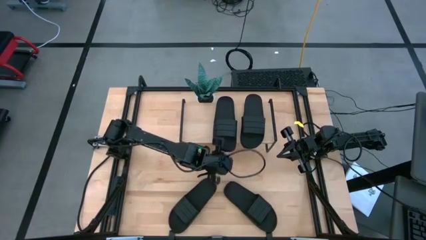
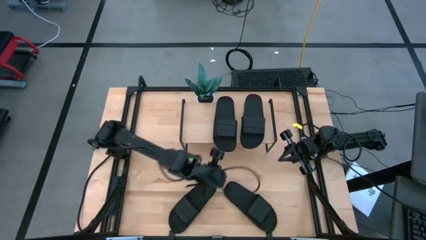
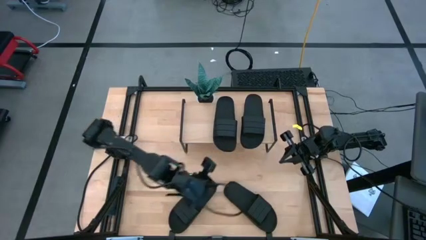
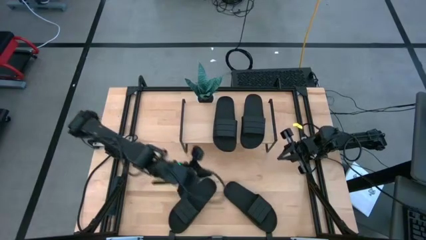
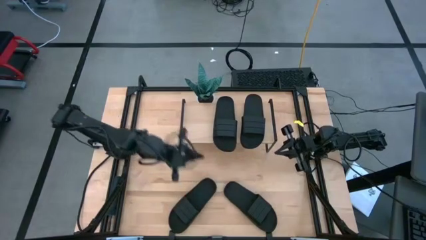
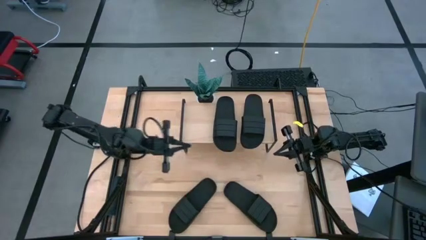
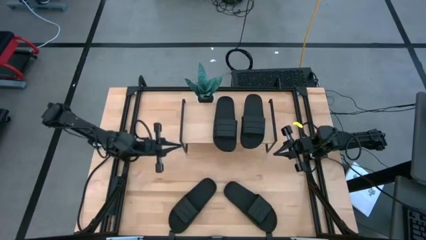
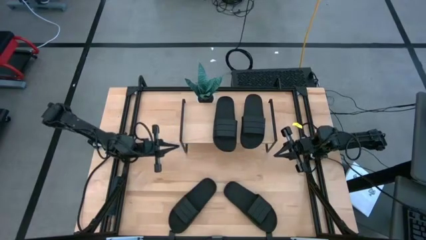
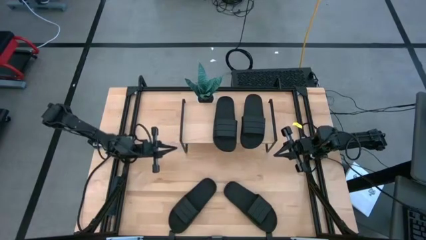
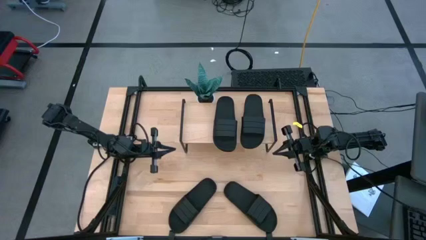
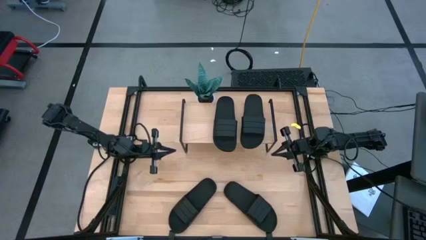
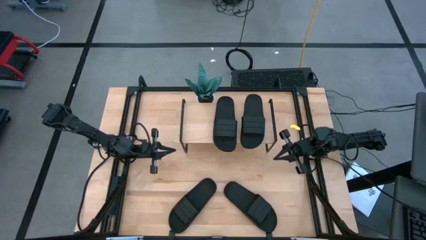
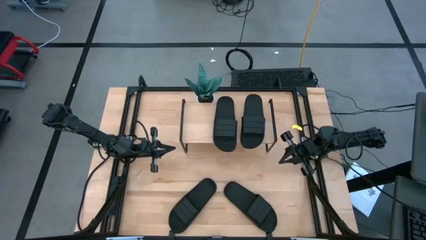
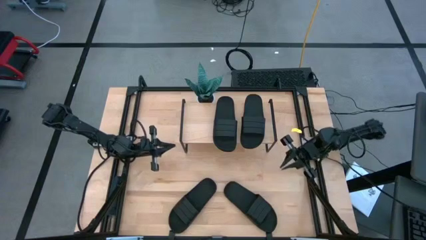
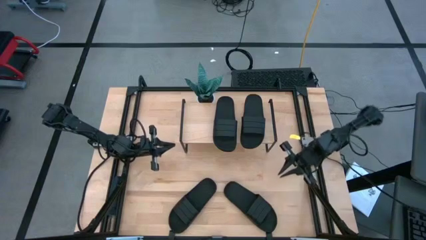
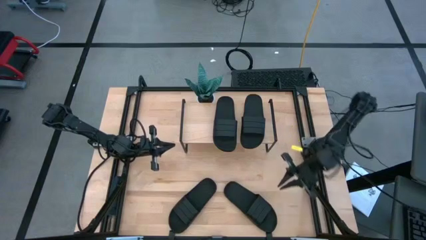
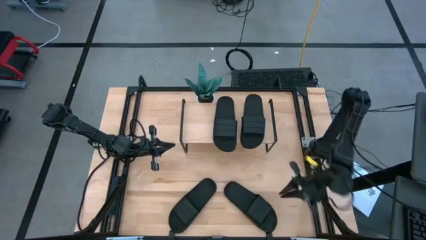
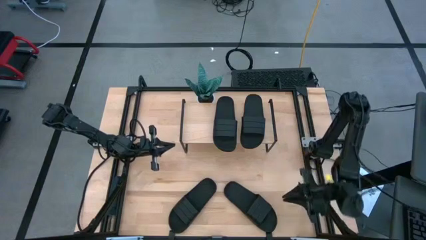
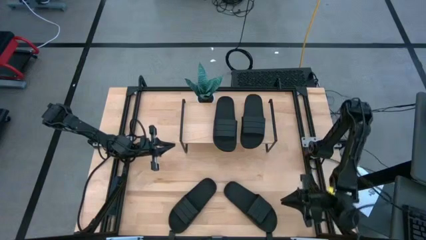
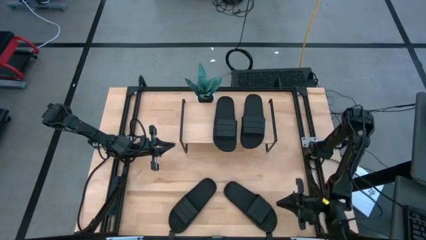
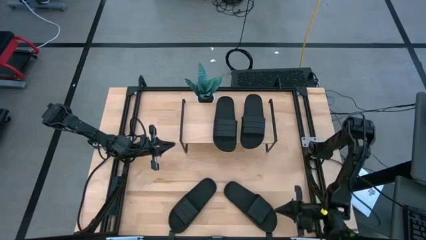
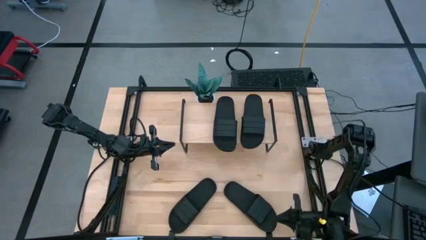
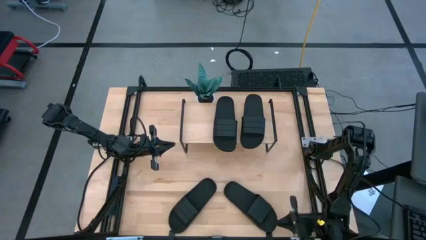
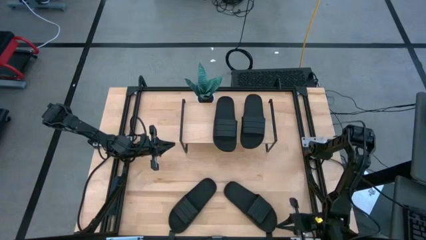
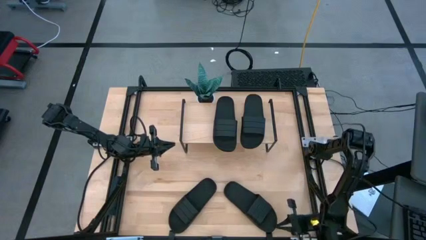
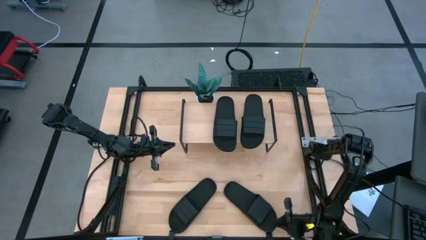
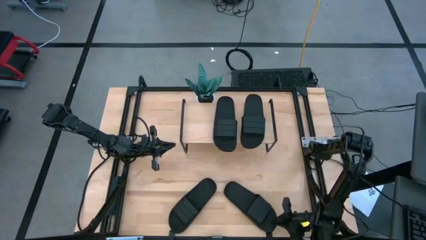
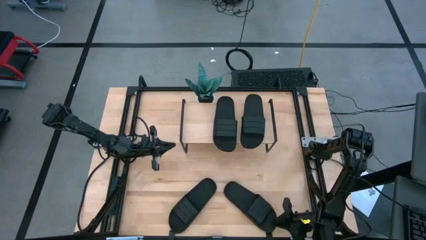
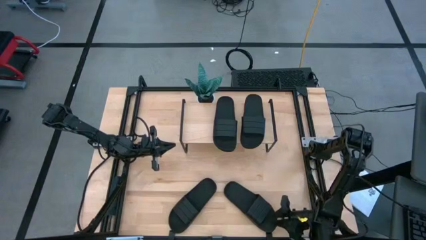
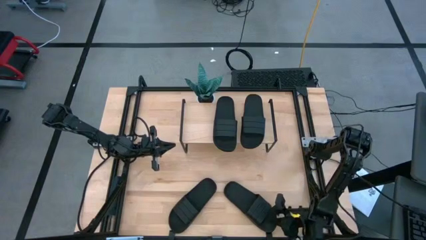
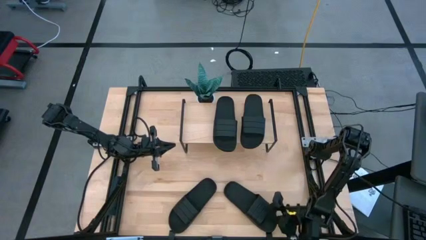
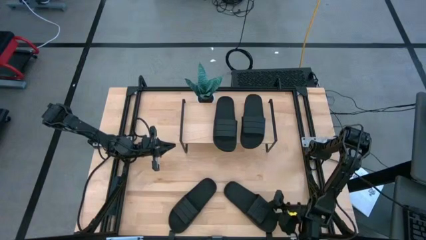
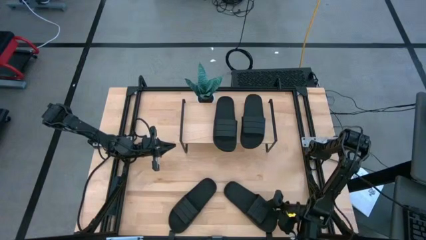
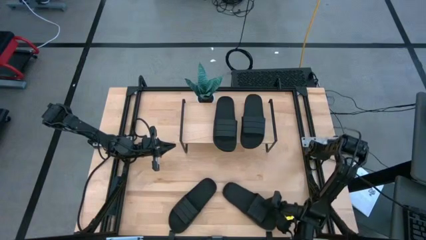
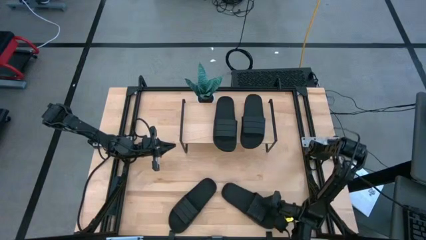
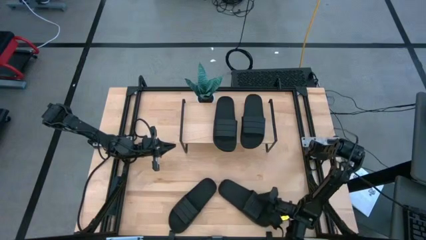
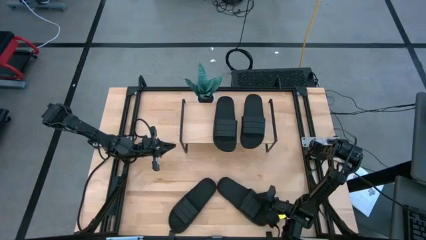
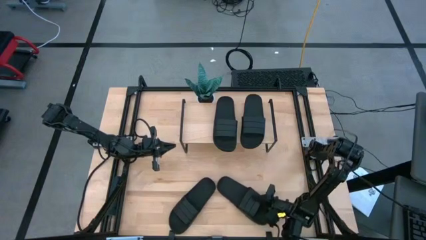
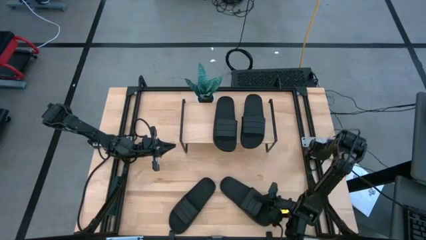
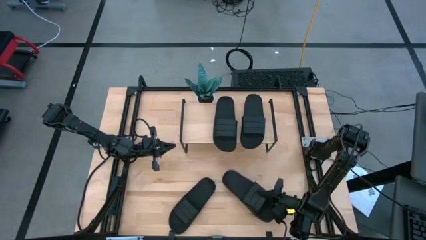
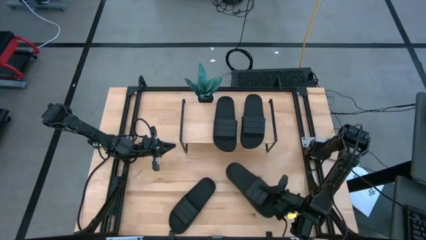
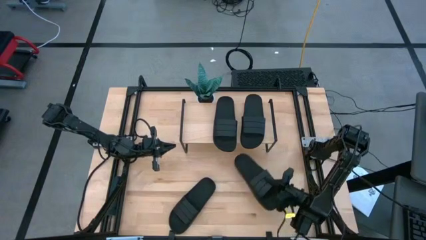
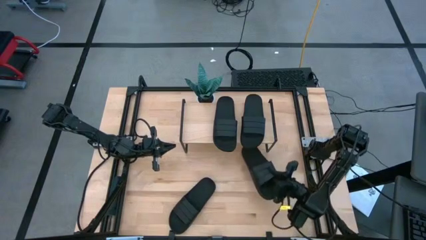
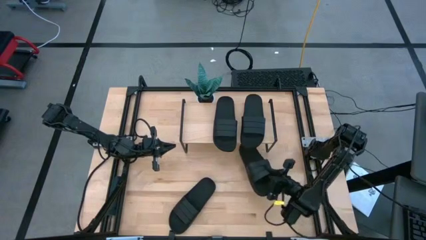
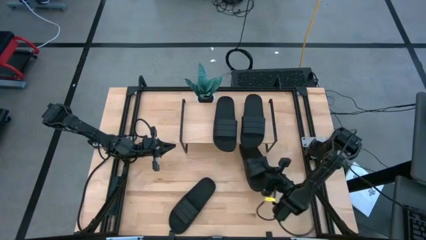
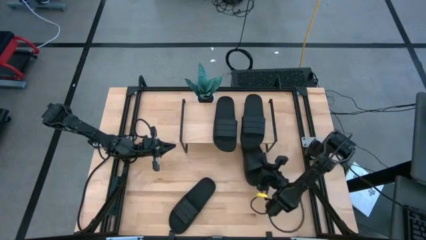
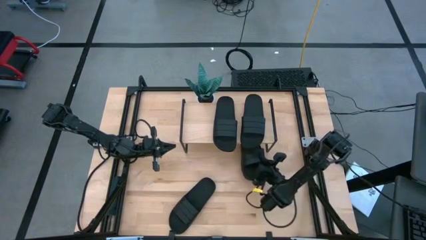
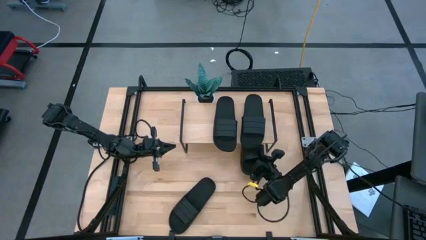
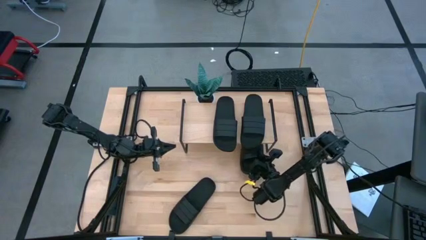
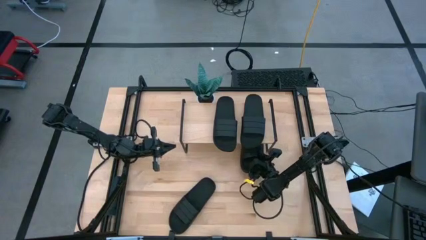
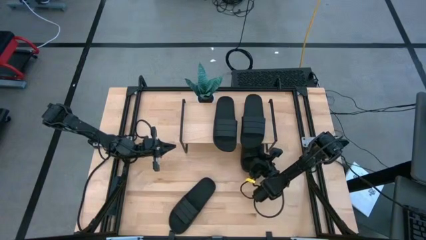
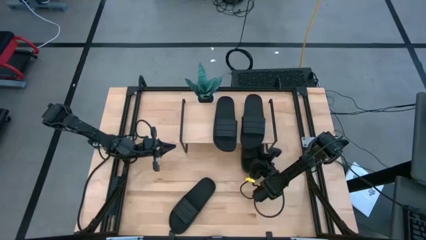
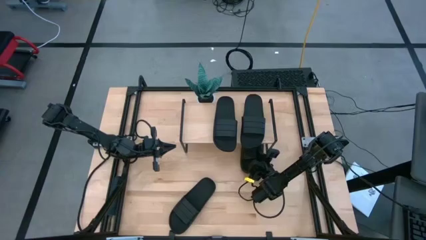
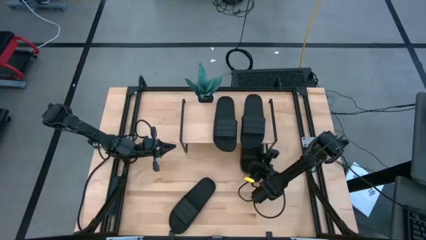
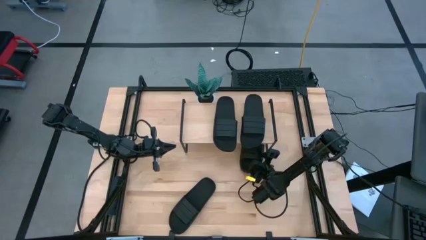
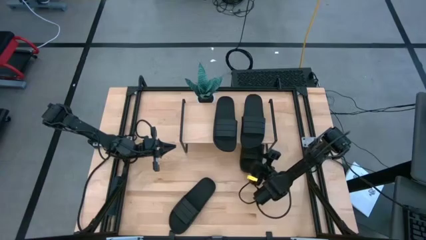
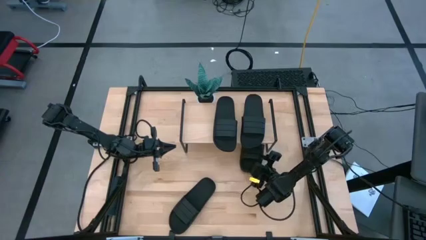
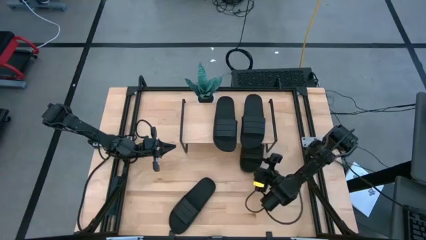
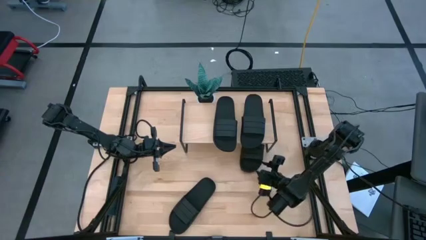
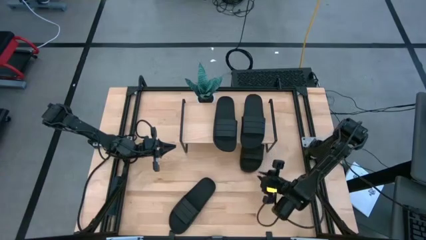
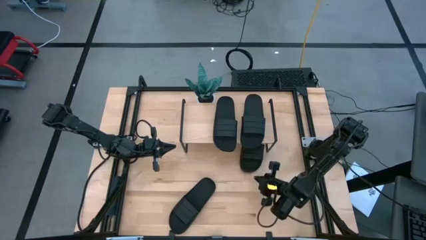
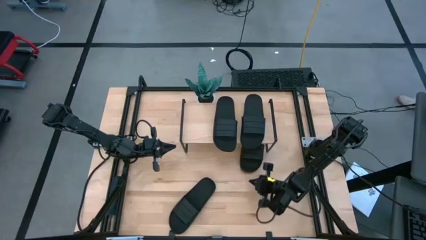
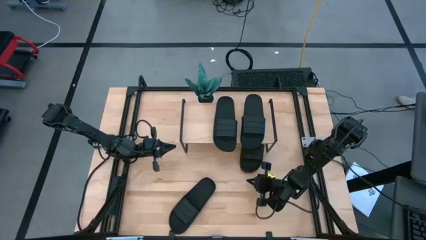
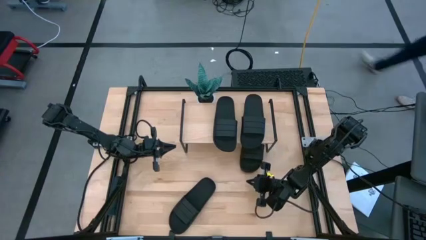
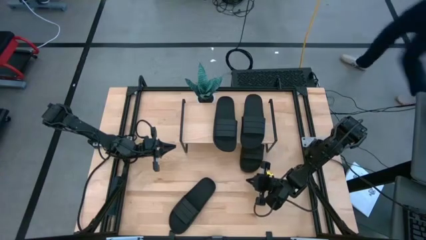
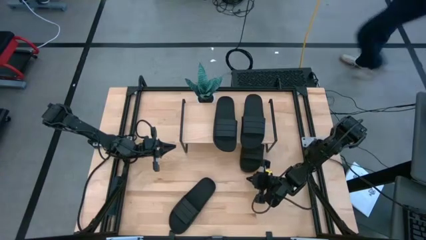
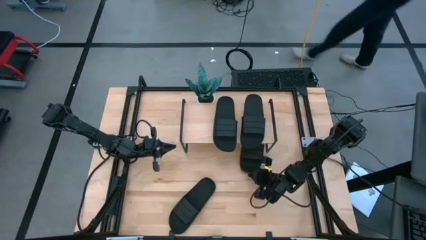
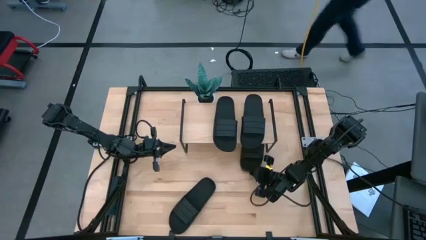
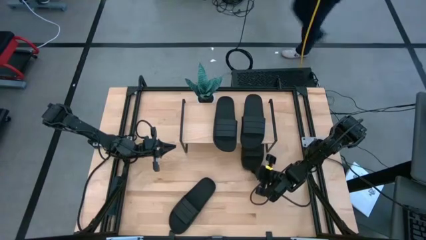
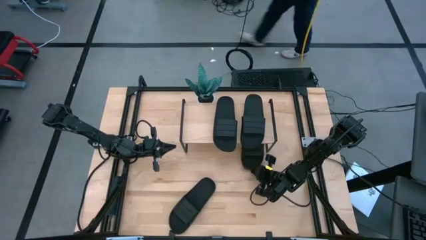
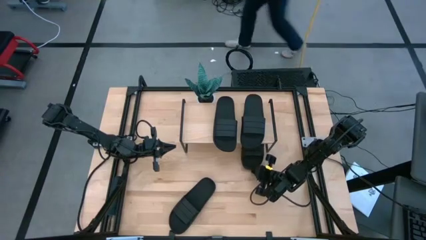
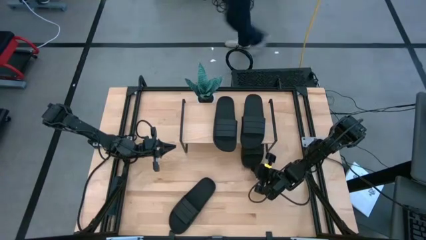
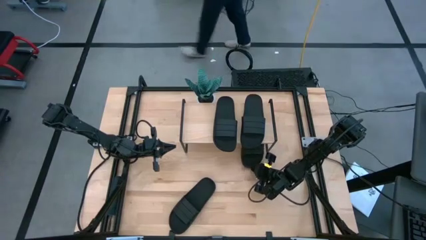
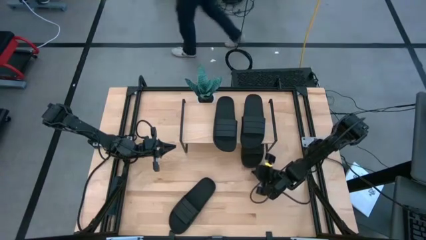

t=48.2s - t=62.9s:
Task: Pick and place slides into the shelf
Put the right slide under the shelf
